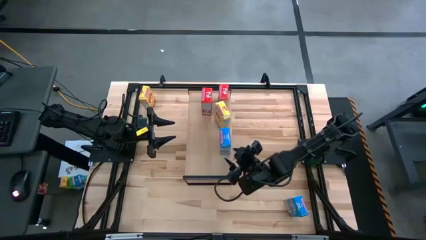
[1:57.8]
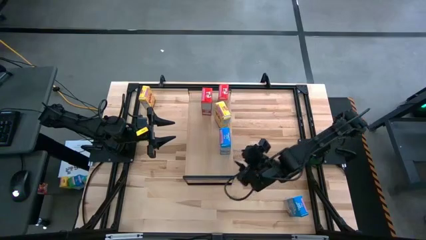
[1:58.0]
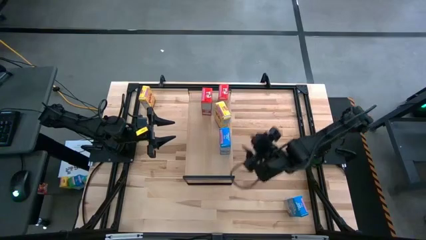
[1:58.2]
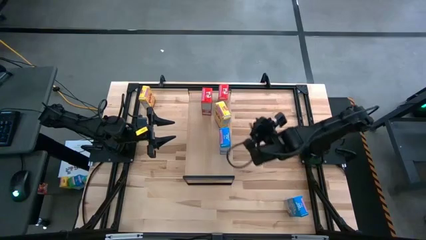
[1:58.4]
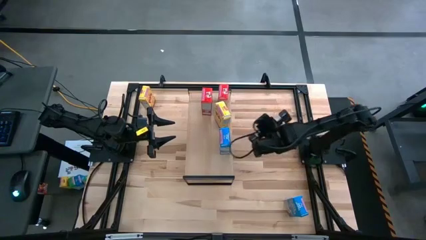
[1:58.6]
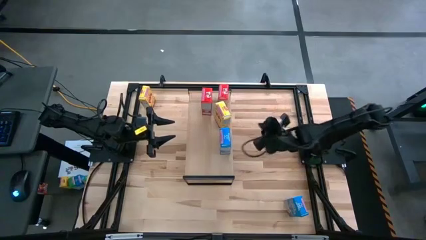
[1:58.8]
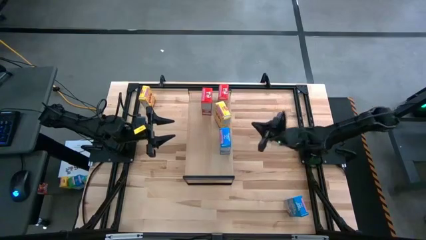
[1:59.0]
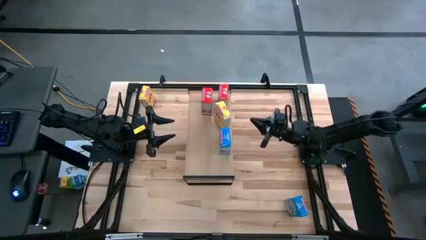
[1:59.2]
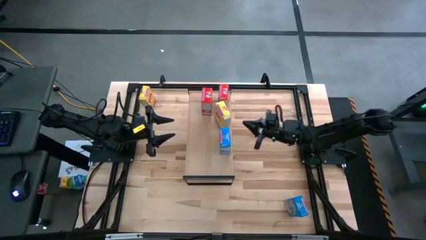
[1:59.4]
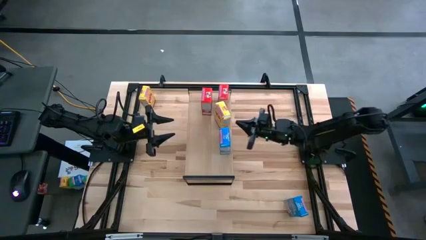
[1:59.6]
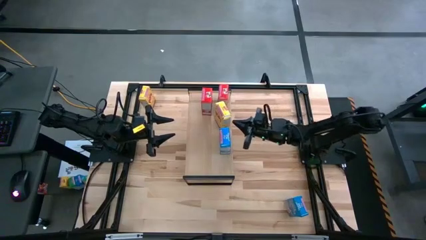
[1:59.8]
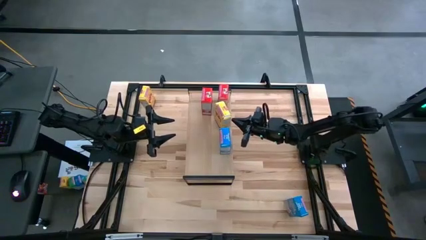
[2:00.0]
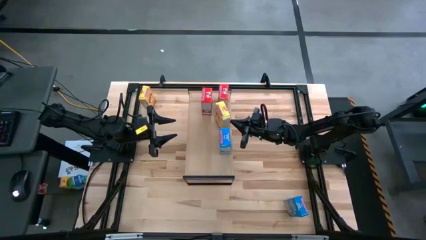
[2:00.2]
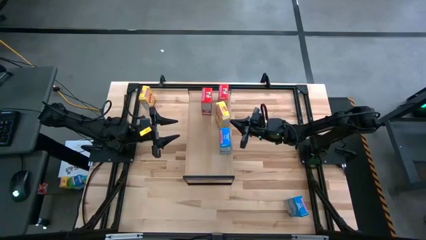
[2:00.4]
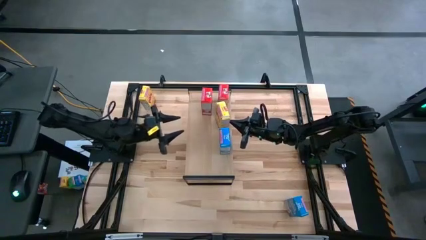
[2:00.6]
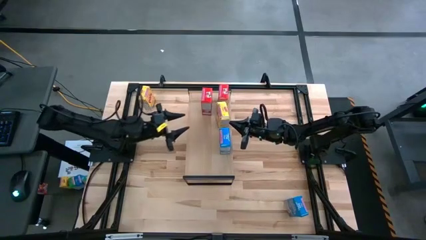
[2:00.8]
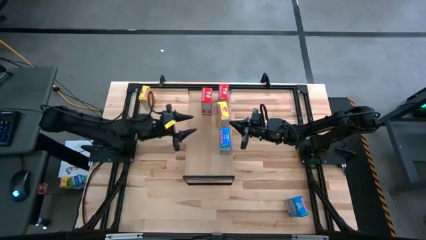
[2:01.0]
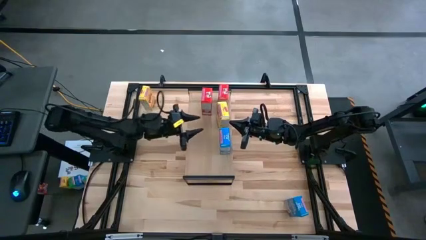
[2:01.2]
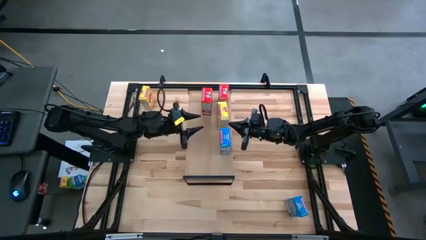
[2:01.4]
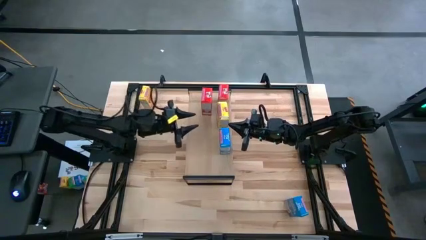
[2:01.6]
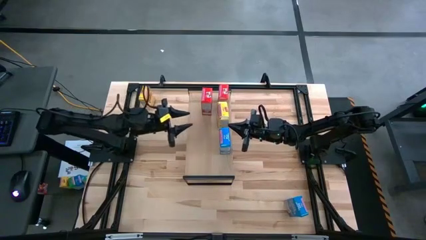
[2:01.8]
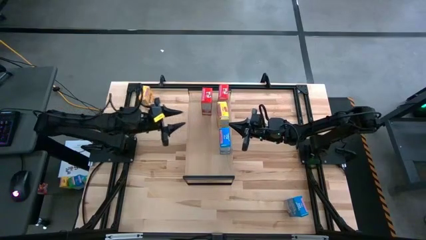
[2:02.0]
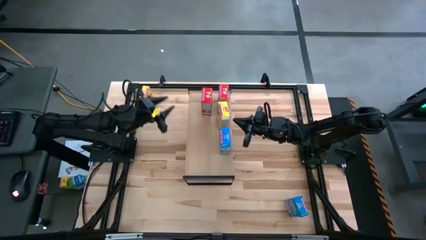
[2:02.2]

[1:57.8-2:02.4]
Task: Stack cereal on shelf
Adjust the yellow cereal box on the shelf

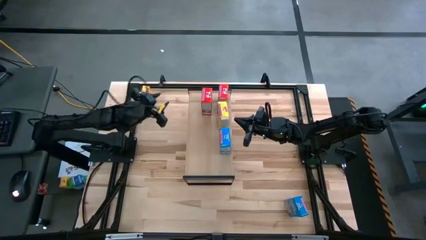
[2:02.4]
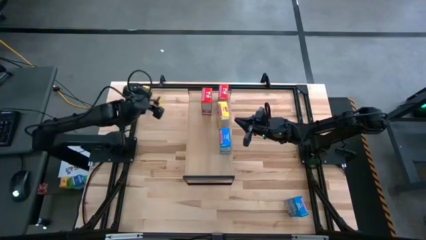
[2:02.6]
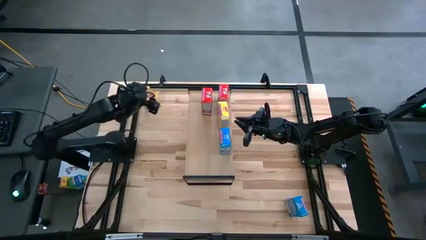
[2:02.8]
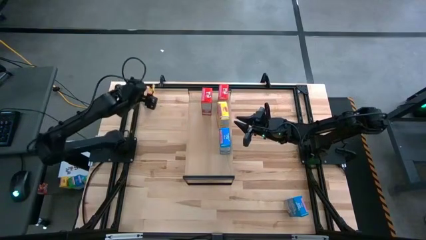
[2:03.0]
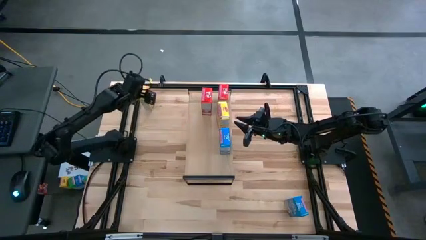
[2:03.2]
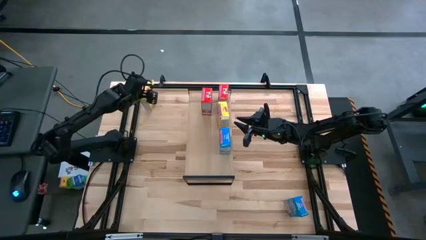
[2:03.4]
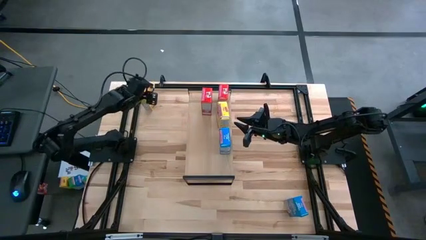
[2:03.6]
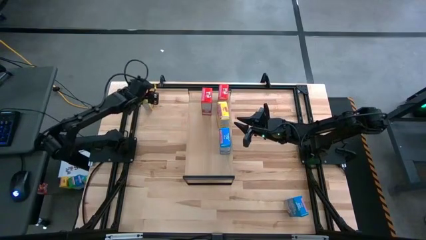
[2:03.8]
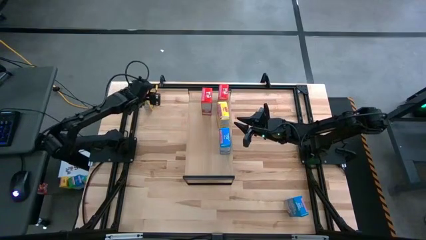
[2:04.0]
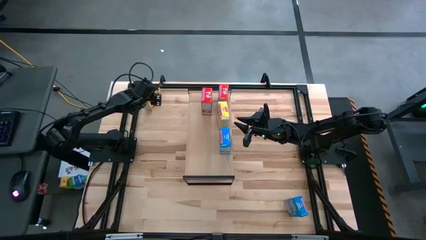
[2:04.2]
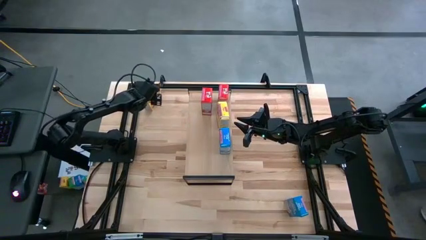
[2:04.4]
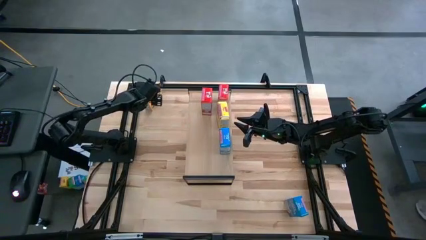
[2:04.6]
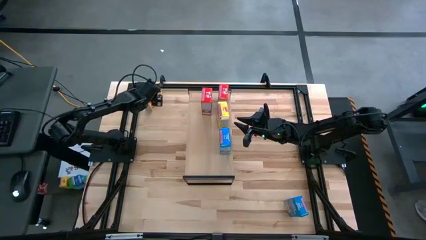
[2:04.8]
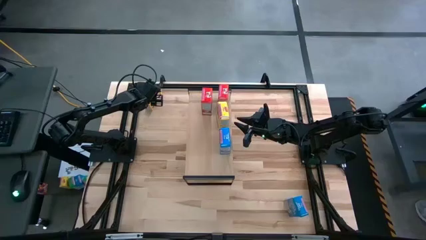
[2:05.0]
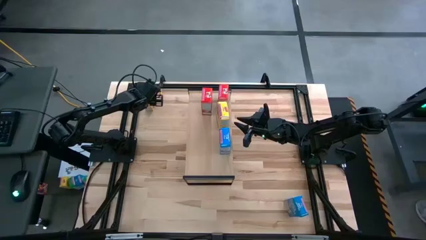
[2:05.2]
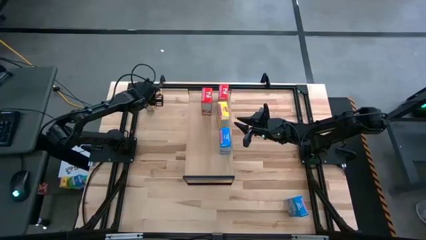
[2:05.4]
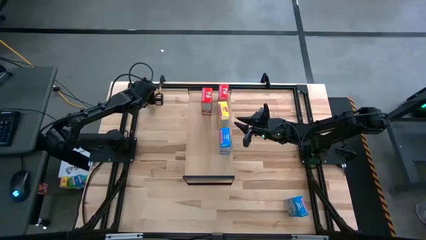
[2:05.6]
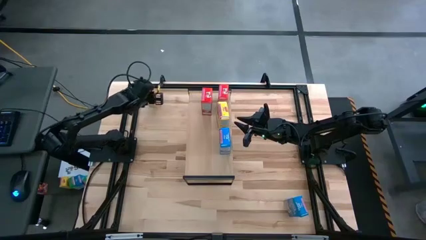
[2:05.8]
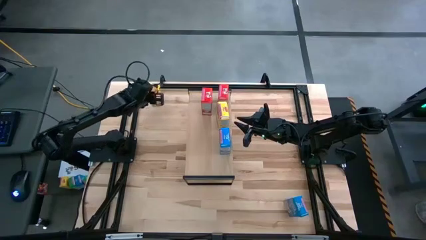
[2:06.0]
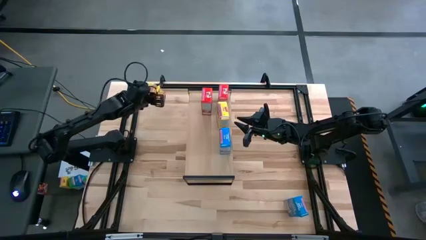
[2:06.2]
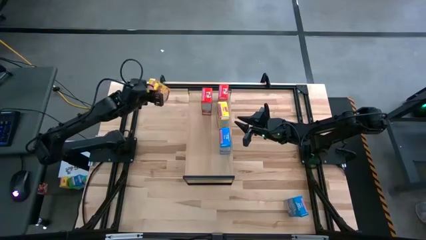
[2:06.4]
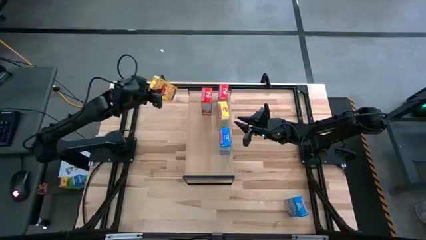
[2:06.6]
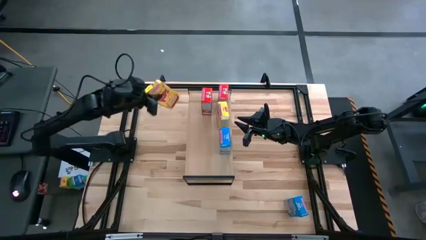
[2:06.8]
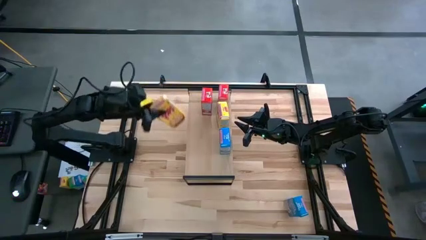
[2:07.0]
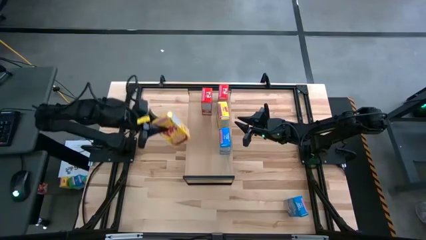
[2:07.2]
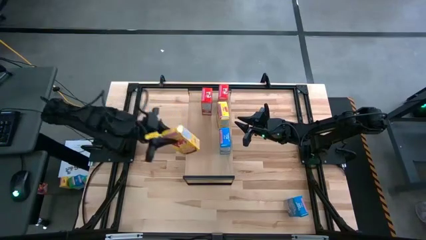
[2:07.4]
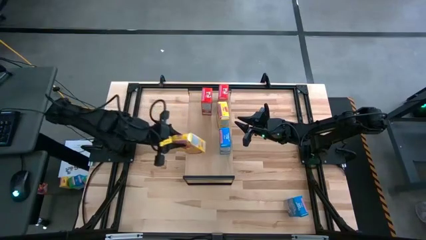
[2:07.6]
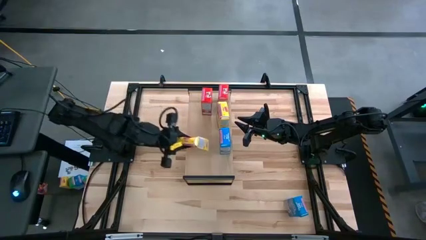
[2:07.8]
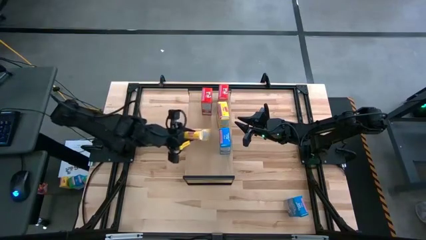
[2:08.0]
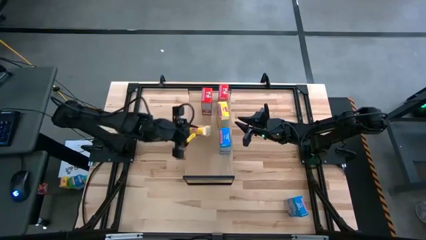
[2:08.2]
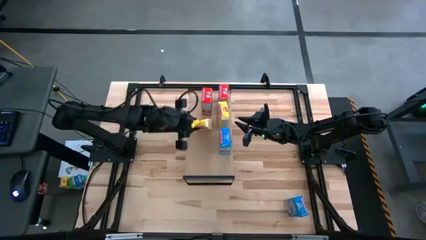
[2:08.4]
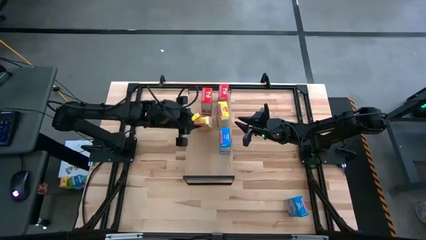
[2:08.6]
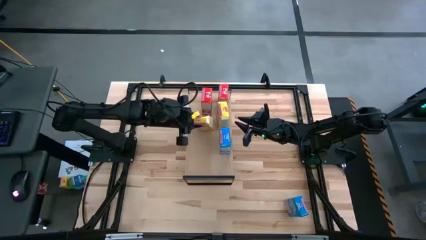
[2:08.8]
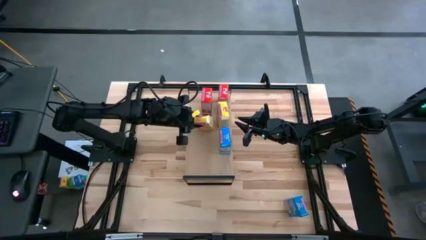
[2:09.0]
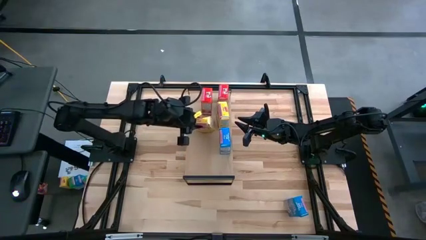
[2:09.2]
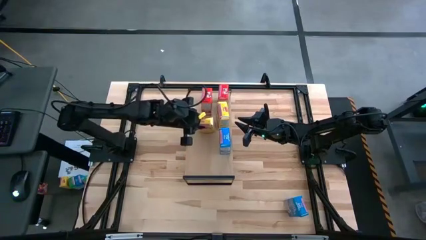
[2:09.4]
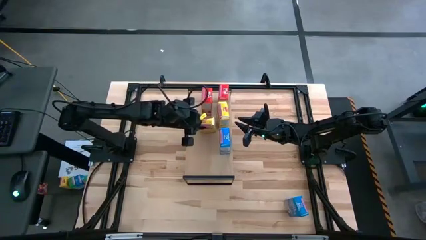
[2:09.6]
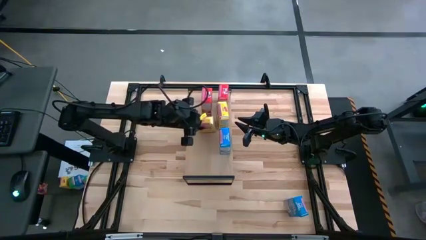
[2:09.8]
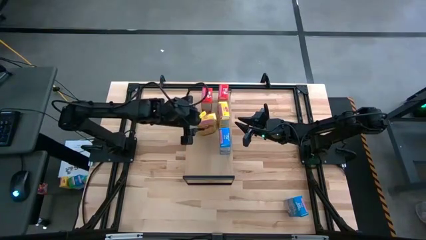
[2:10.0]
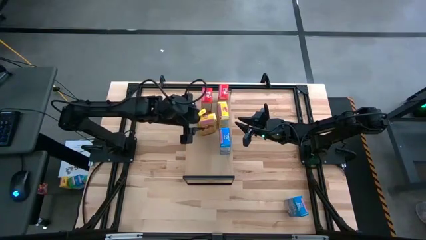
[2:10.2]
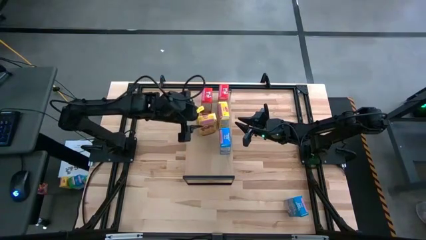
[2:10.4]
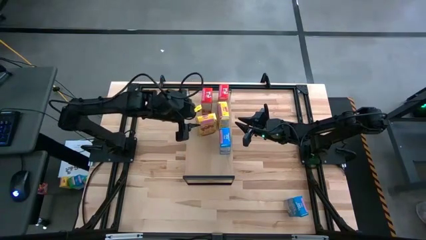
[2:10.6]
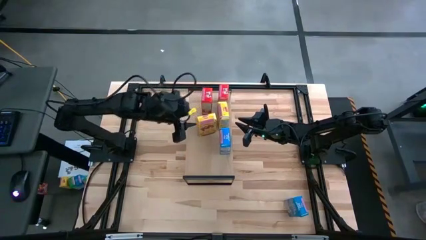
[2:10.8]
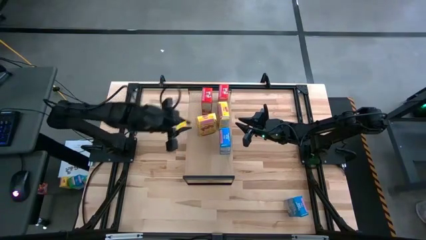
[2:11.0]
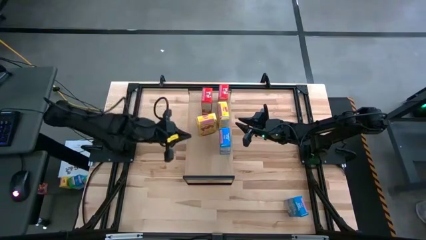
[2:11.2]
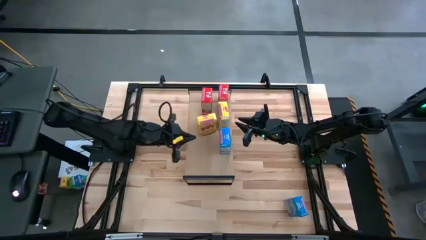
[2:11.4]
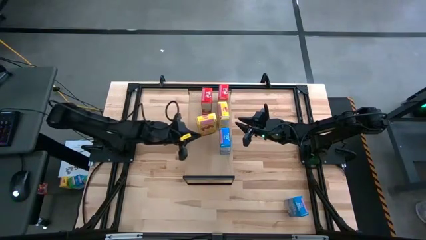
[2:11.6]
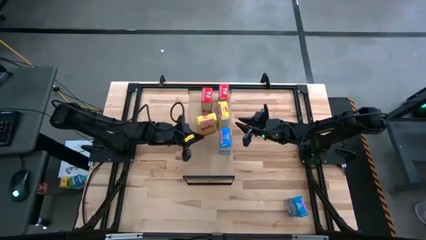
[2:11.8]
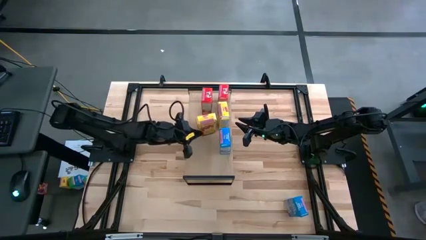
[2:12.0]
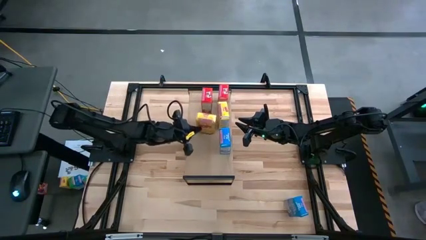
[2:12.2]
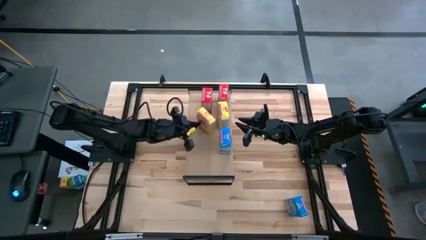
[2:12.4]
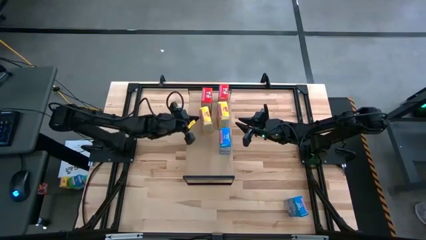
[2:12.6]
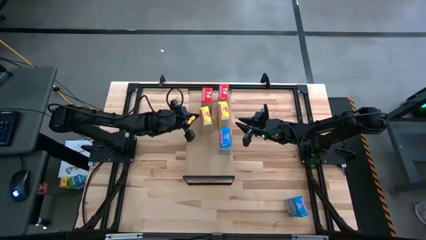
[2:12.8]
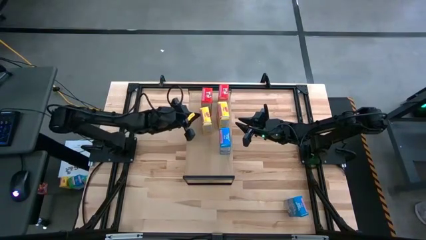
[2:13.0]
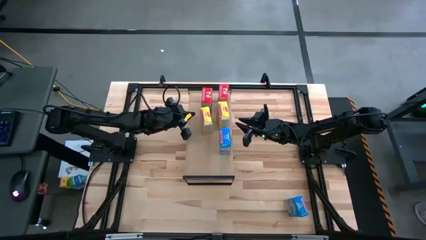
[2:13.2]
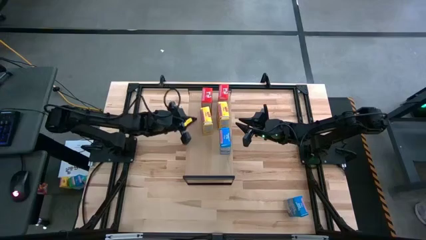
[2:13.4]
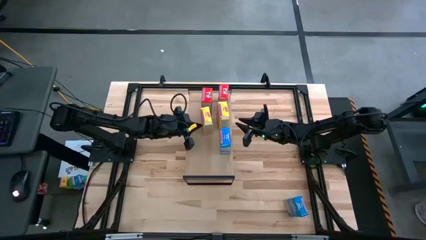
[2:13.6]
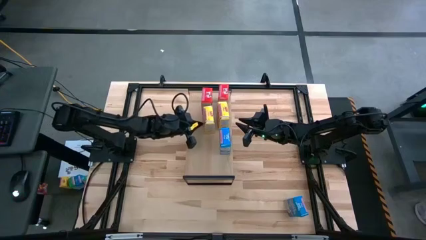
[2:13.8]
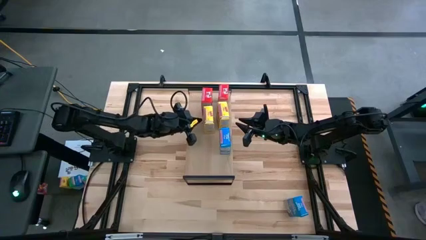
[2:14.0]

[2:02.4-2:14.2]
Put the yellow cereal box on the shelf aligned with the other yellow cereal box
